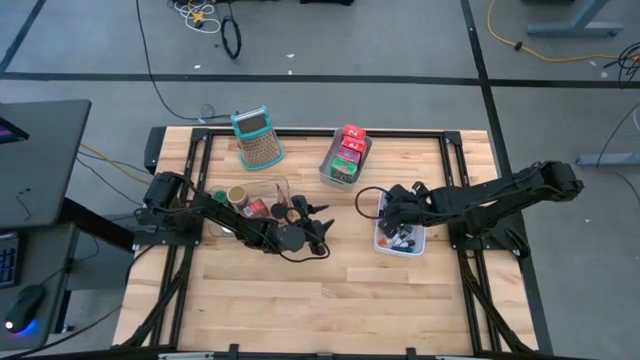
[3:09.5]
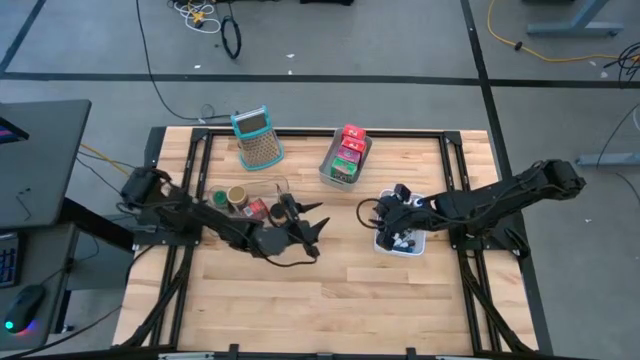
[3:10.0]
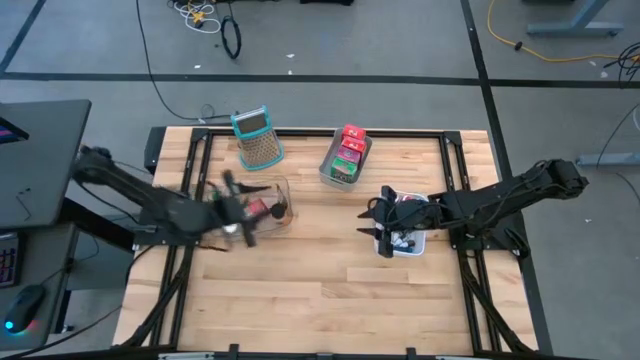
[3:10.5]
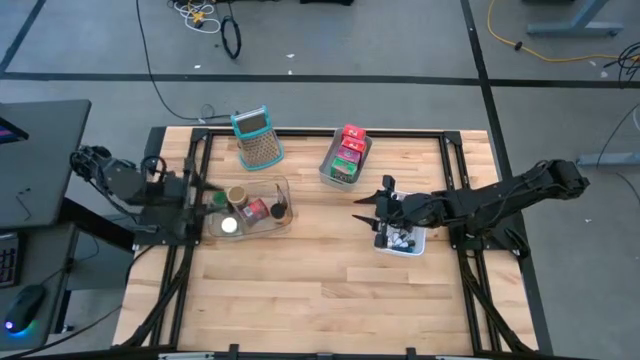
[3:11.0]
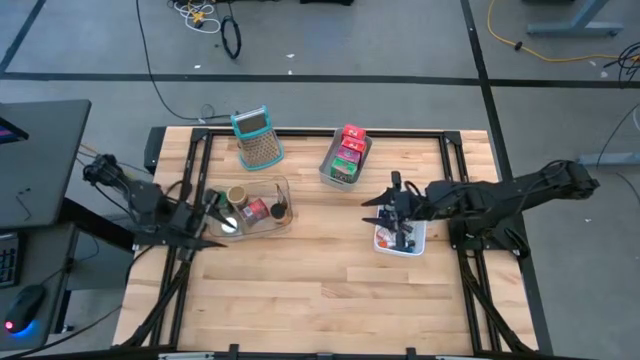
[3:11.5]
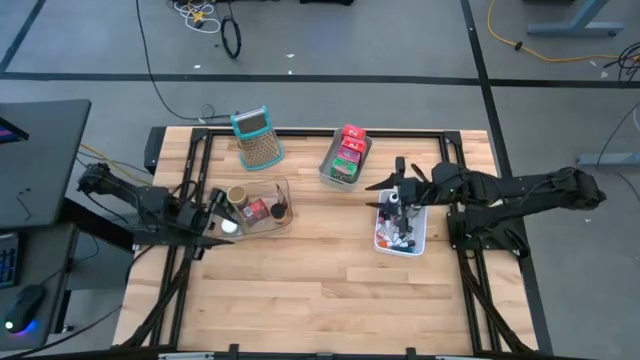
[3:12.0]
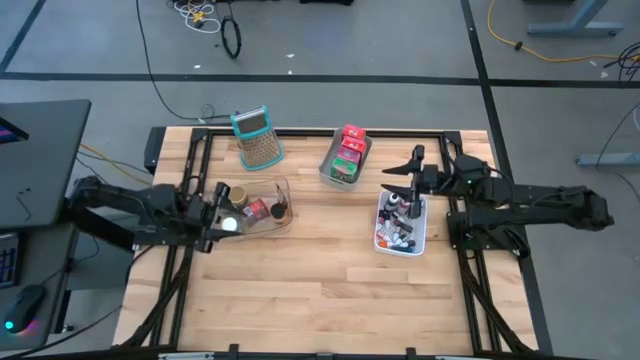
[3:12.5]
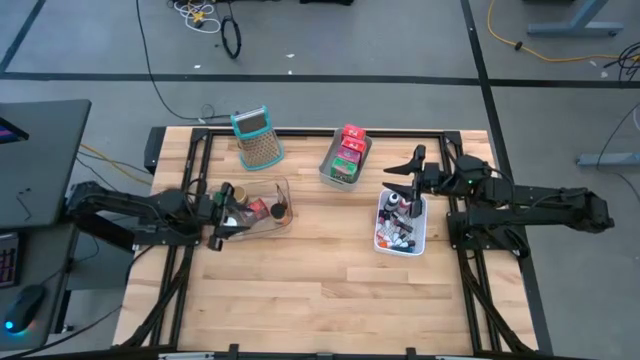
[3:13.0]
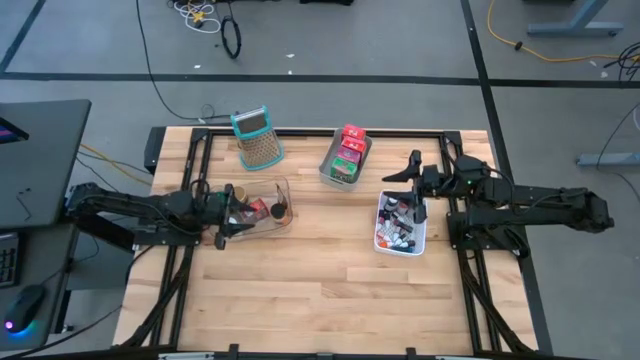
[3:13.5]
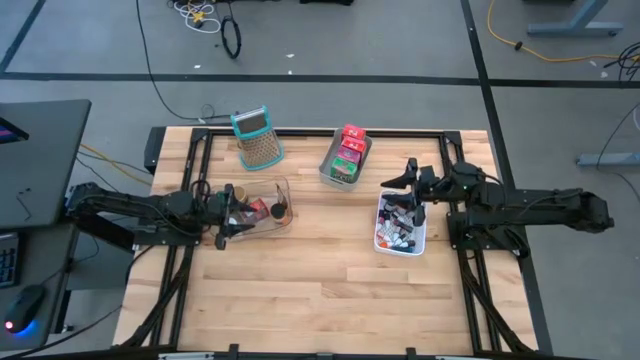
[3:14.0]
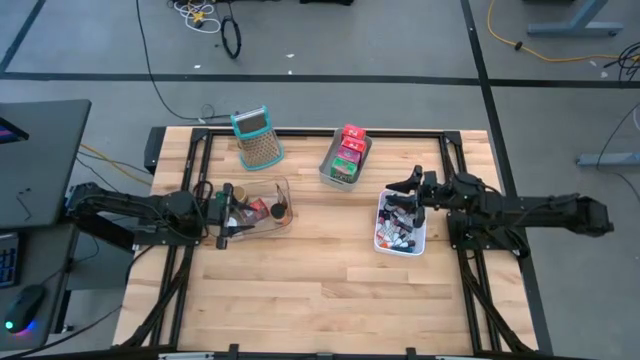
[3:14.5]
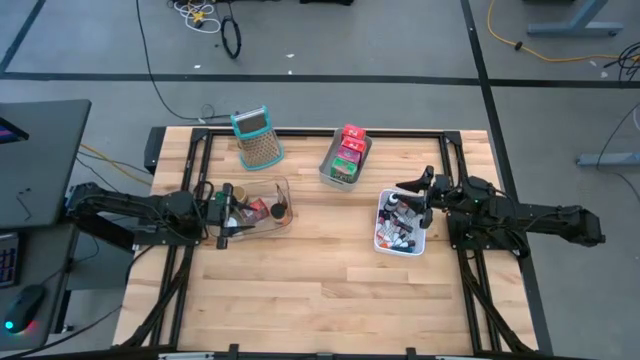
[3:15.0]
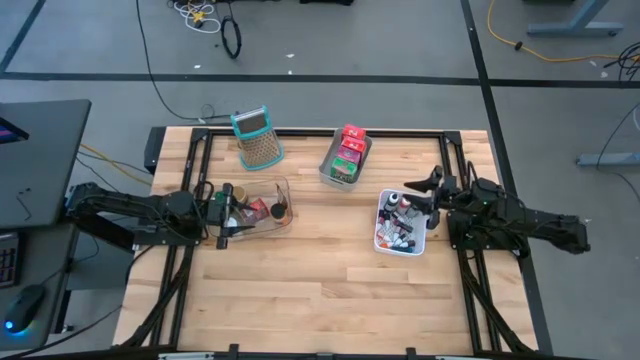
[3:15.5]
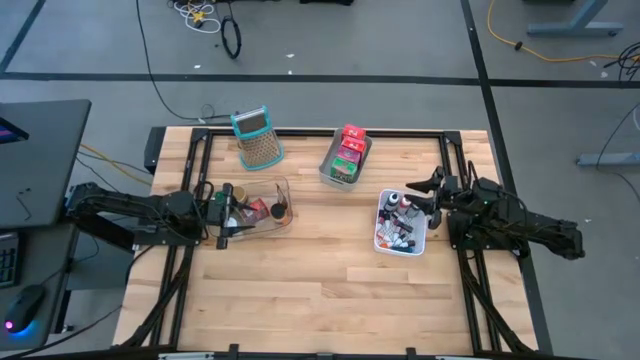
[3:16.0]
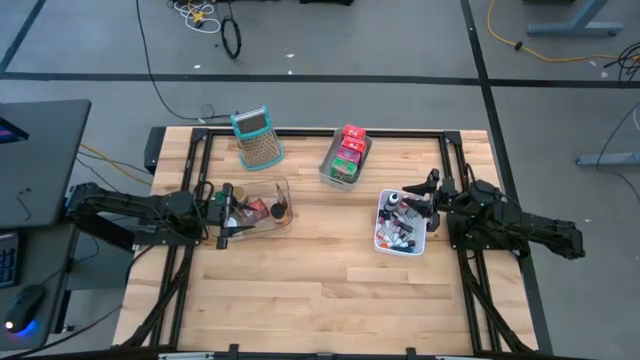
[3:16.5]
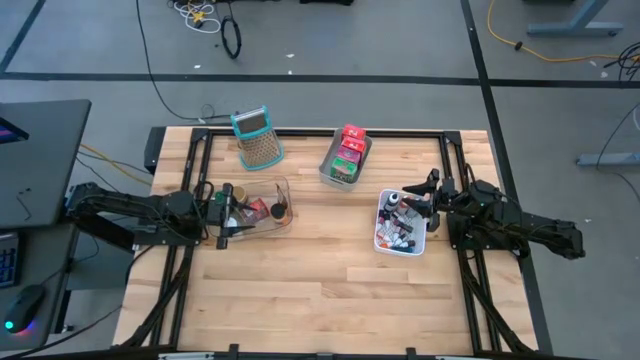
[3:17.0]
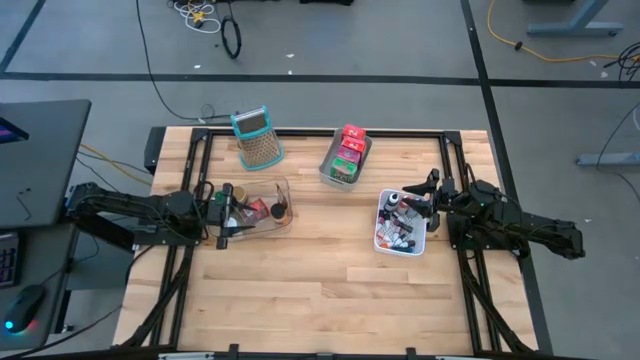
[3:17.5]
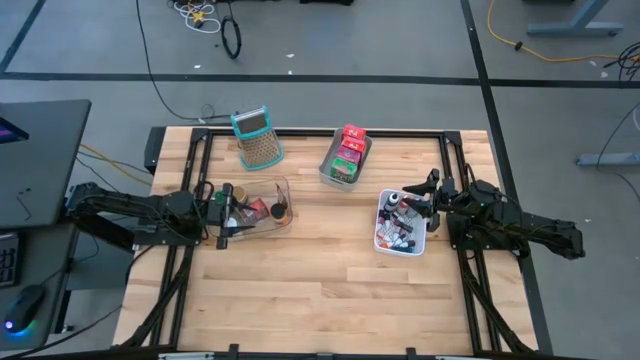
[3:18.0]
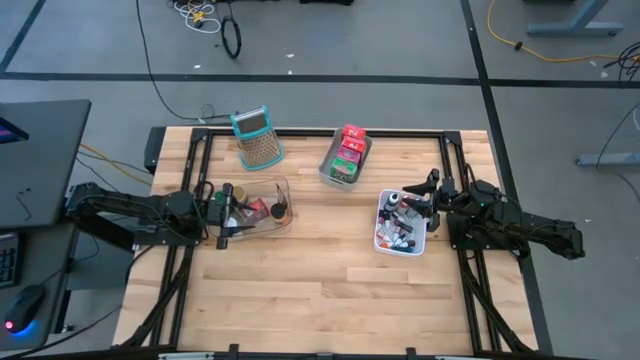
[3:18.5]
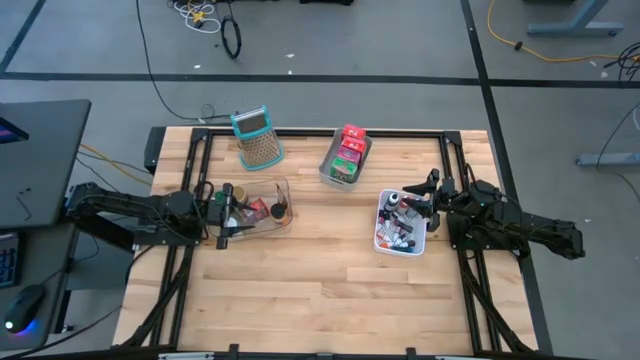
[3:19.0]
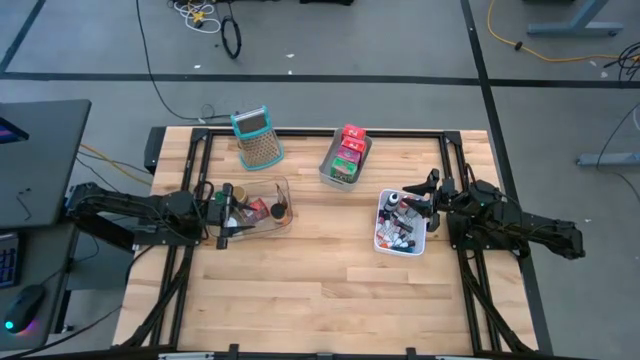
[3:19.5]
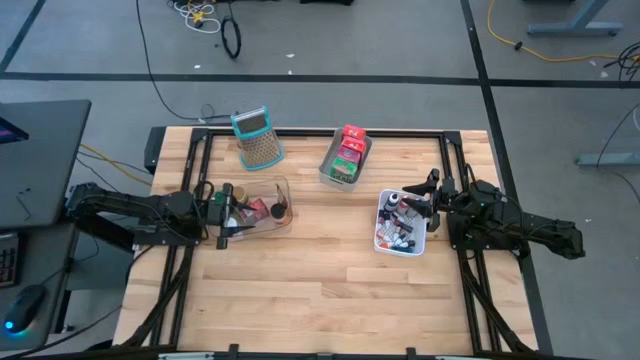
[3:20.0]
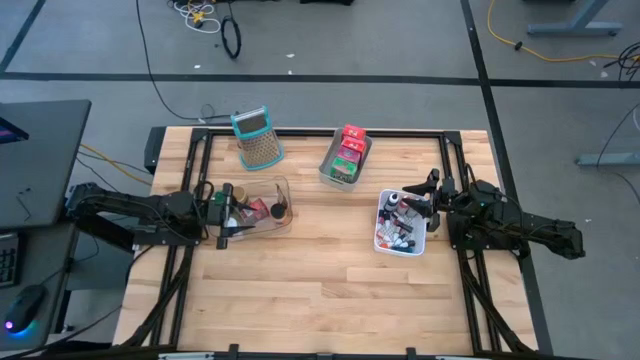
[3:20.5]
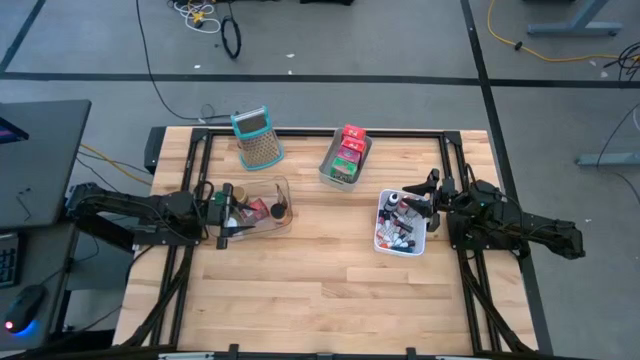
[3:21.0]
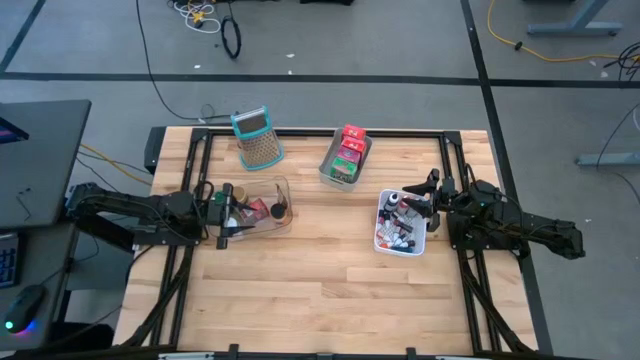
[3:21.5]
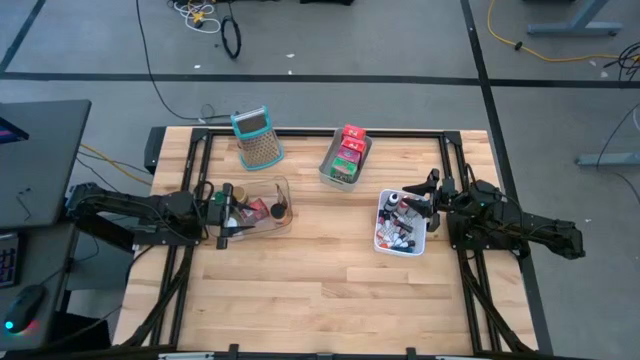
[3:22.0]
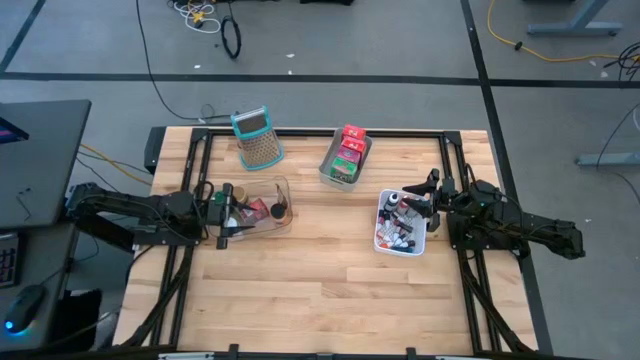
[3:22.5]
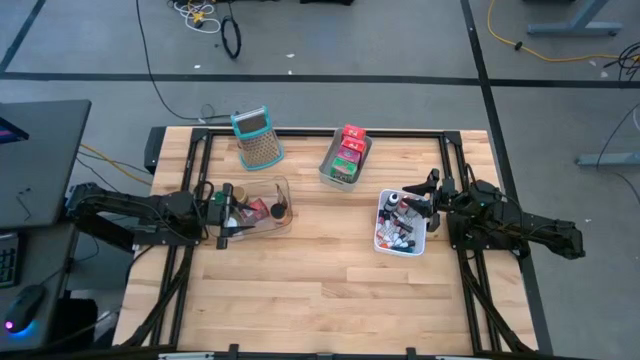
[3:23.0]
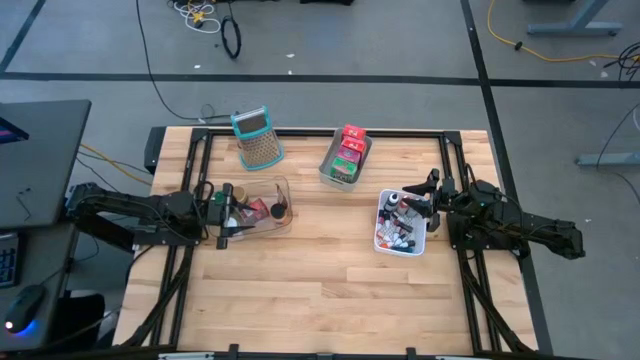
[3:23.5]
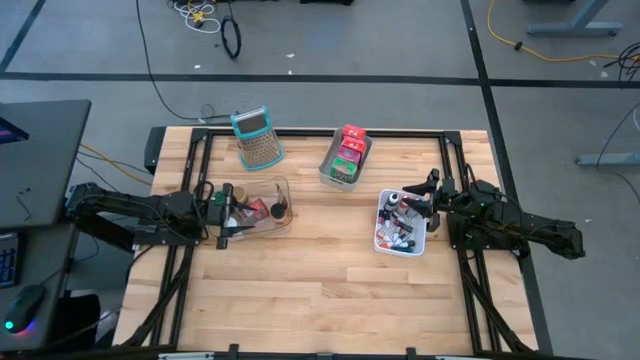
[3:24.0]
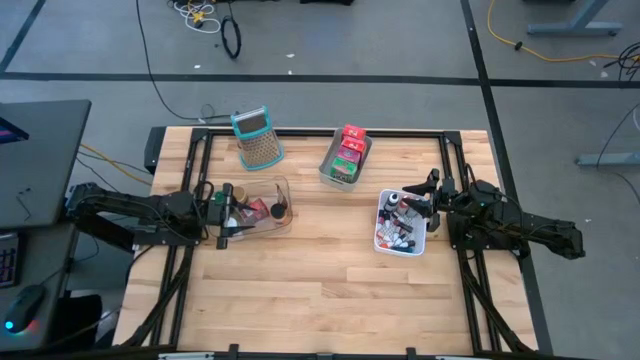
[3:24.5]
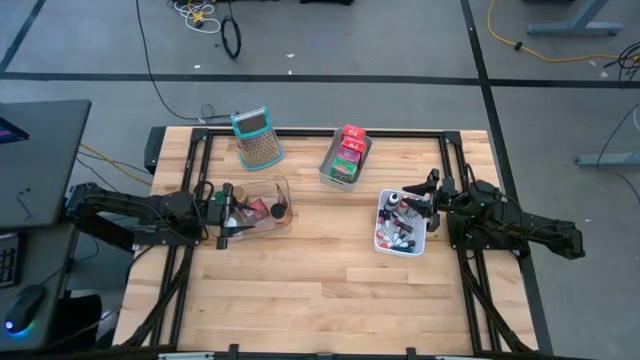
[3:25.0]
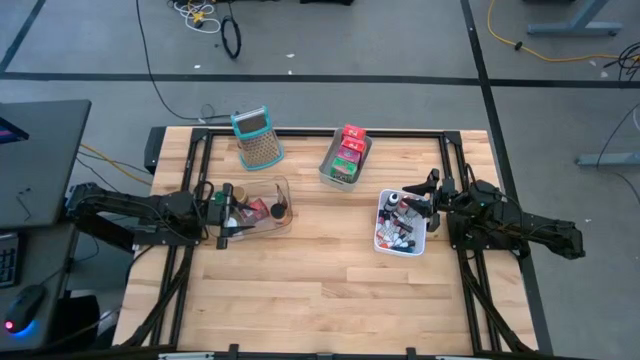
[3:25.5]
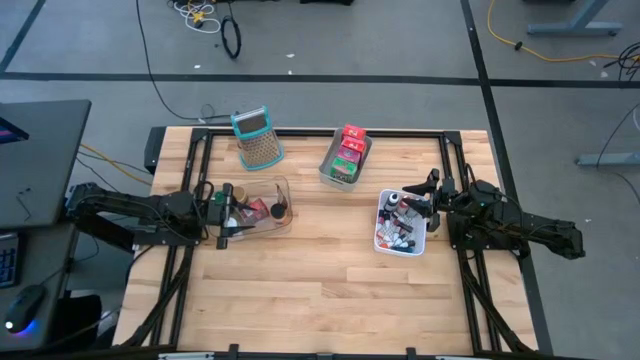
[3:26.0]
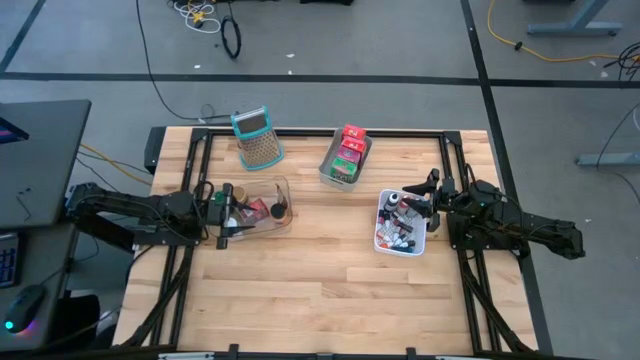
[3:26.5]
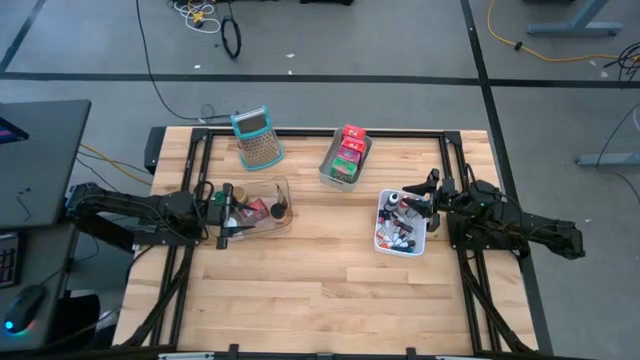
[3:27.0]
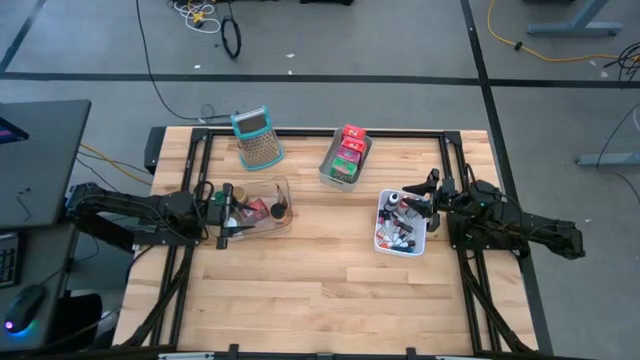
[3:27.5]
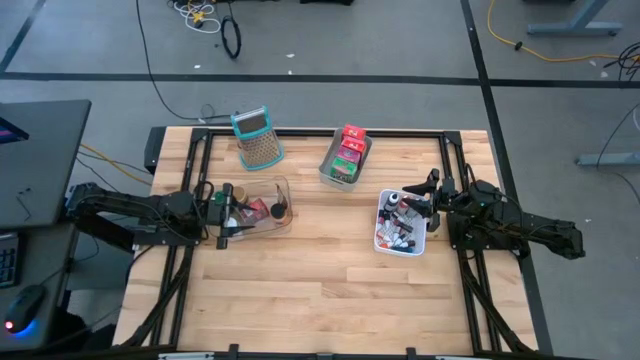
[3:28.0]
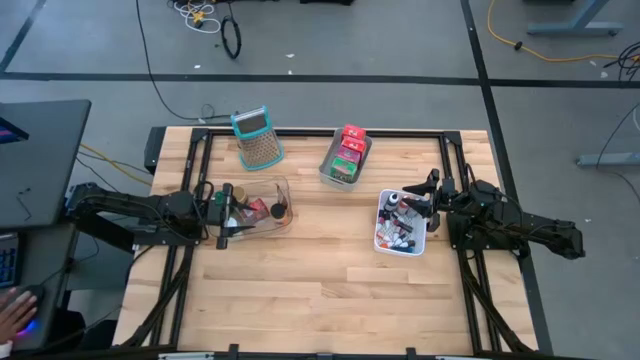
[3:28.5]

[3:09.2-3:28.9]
Task: Pick & Place Kitchen Items
Return to Home Position

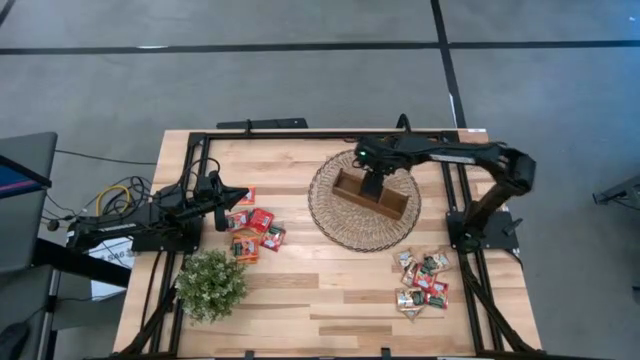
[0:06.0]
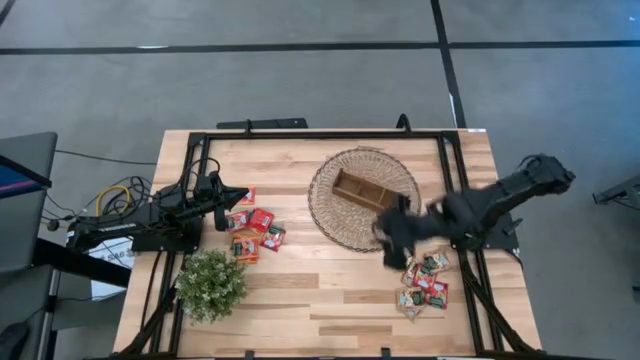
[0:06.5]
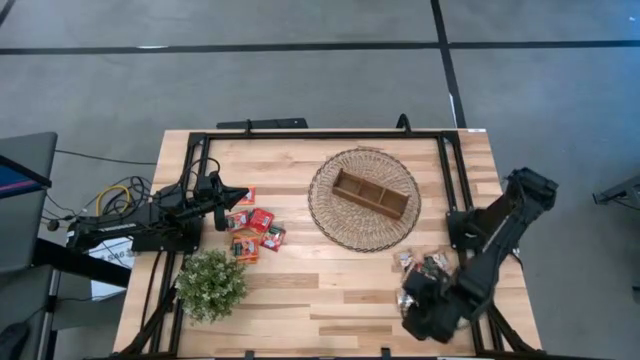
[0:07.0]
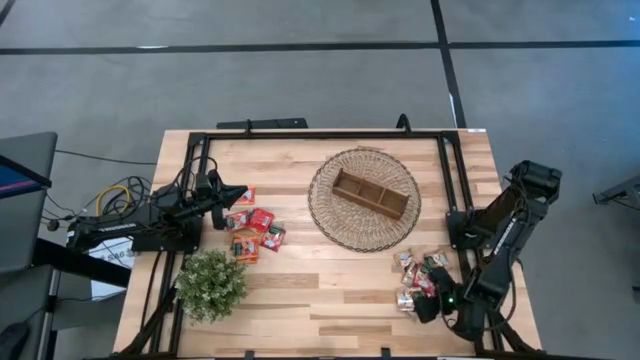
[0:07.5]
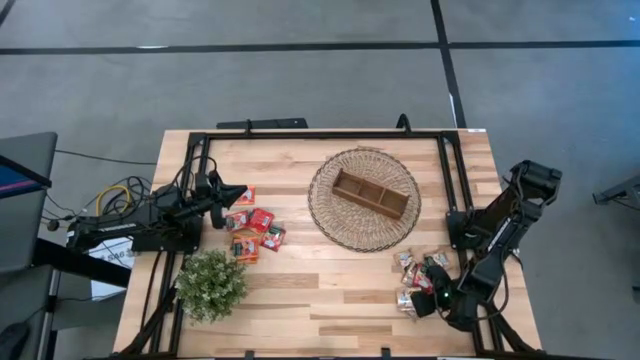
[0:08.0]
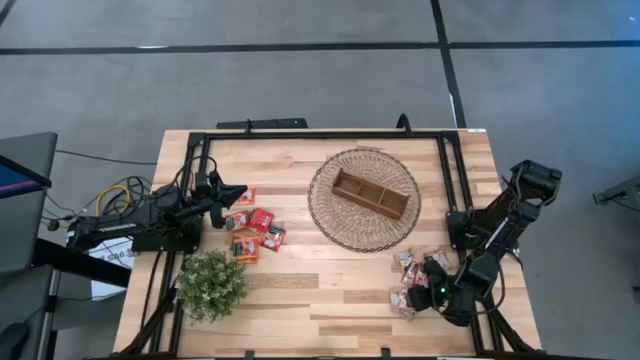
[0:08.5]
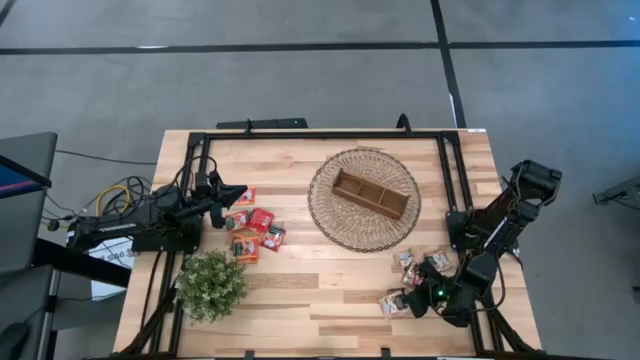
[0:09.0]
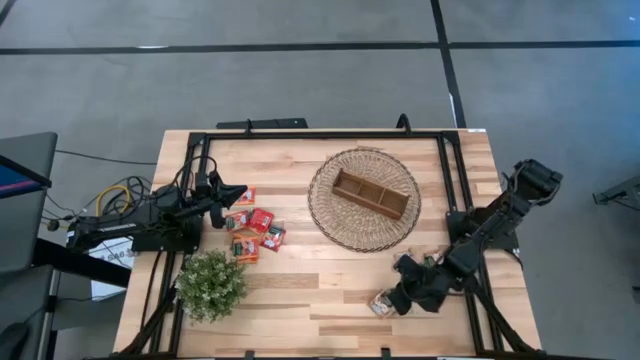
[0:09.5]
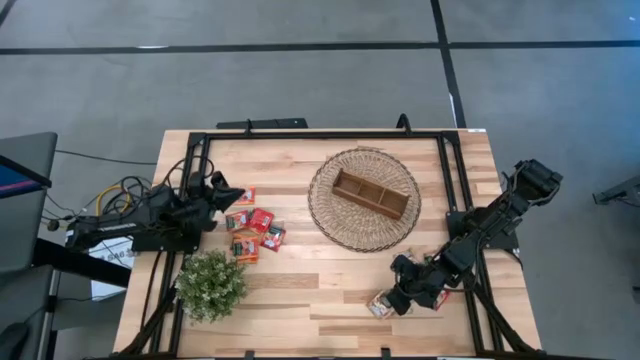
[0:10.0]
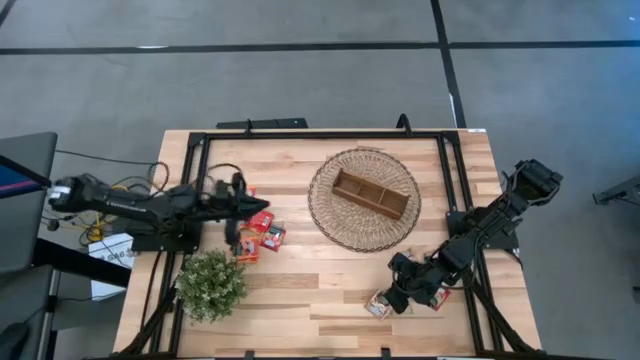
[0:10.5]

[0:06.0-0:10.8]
Task: Pick & Place Tea
Put the brown tea bag into the middle section of the wooden organizer
